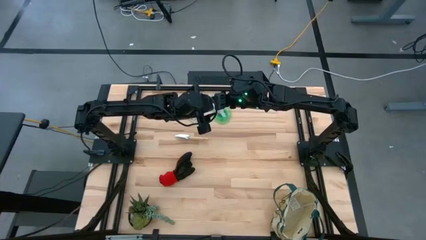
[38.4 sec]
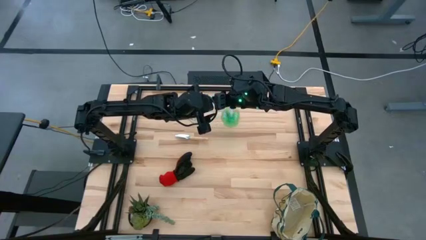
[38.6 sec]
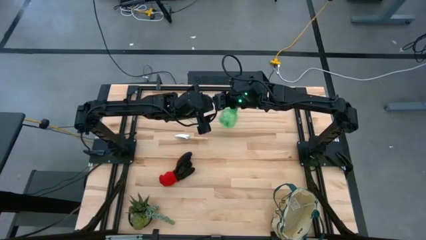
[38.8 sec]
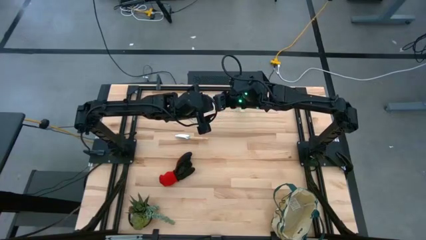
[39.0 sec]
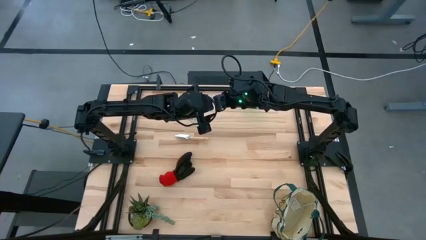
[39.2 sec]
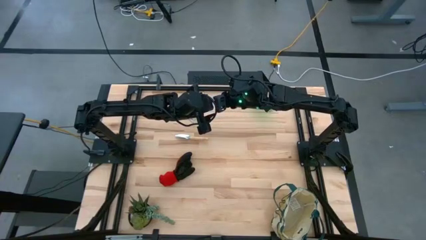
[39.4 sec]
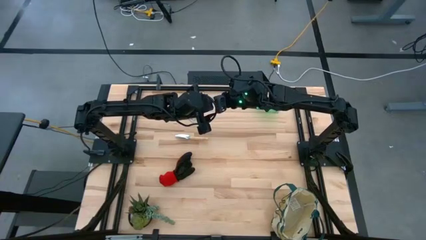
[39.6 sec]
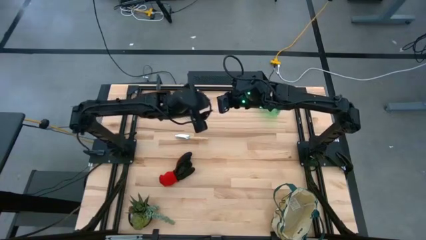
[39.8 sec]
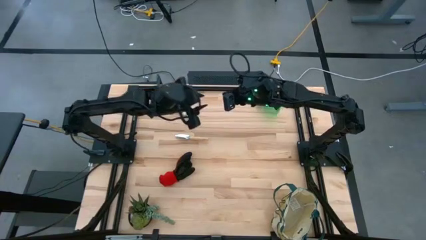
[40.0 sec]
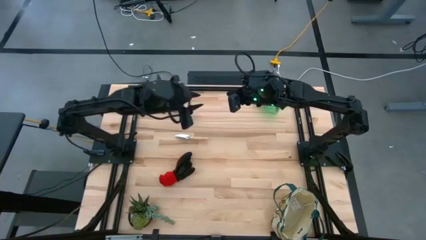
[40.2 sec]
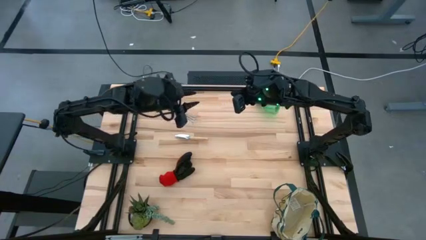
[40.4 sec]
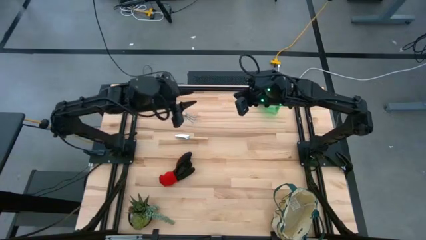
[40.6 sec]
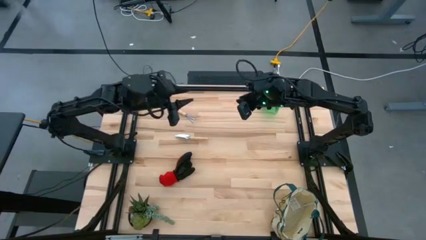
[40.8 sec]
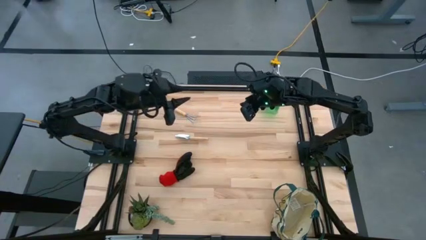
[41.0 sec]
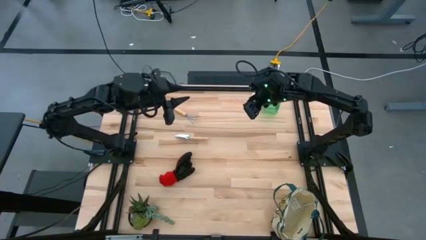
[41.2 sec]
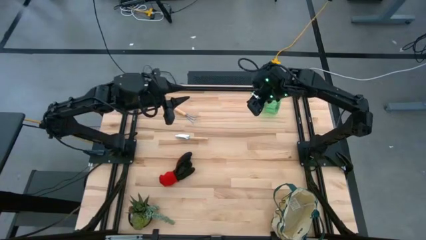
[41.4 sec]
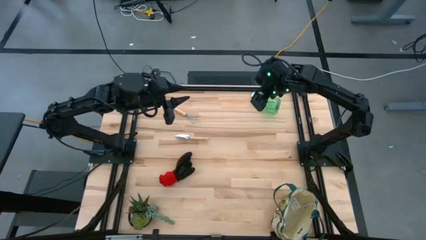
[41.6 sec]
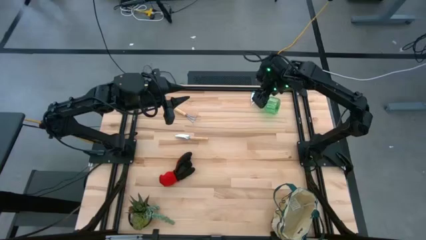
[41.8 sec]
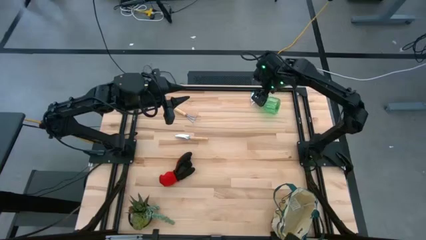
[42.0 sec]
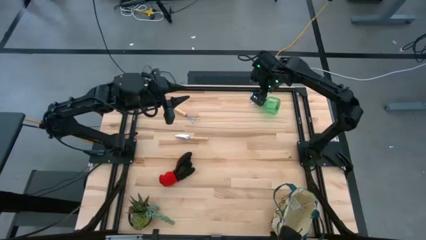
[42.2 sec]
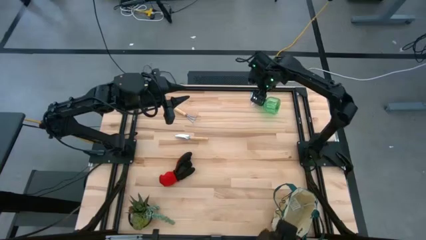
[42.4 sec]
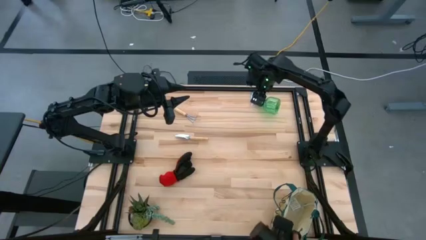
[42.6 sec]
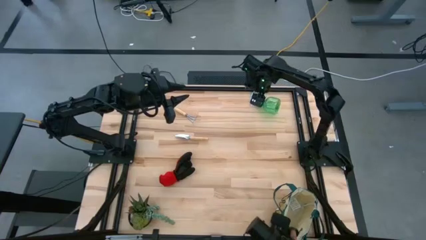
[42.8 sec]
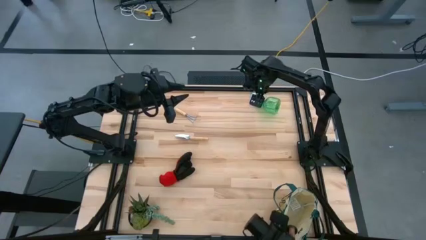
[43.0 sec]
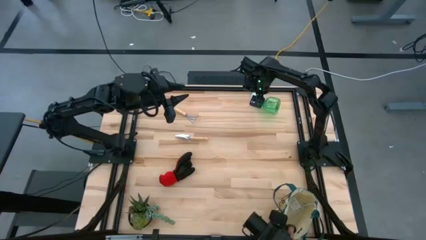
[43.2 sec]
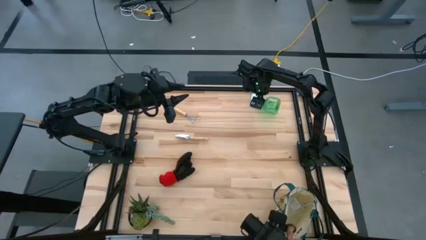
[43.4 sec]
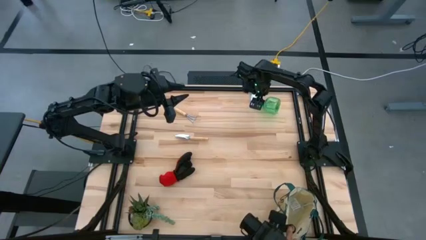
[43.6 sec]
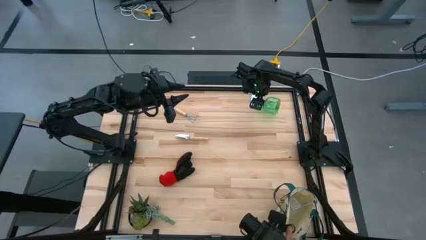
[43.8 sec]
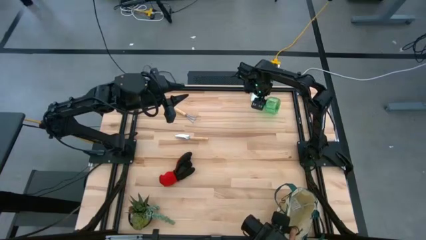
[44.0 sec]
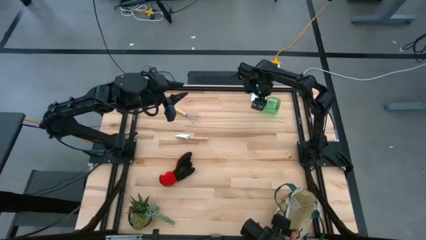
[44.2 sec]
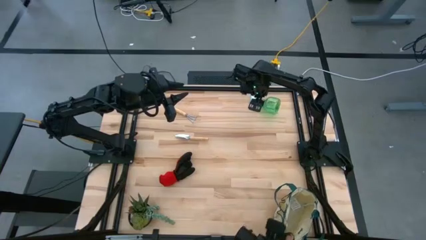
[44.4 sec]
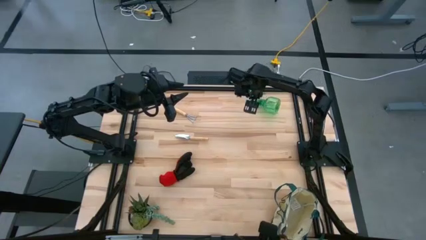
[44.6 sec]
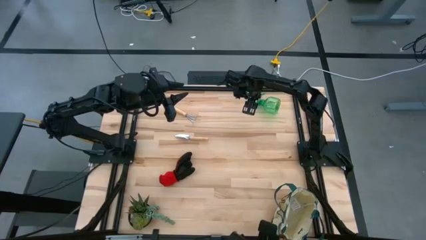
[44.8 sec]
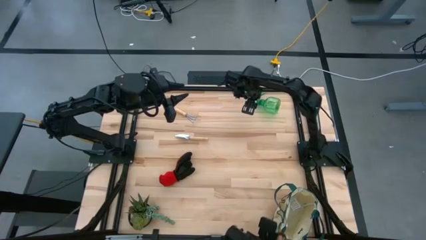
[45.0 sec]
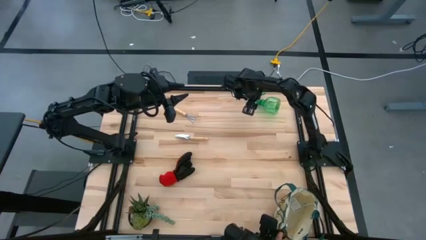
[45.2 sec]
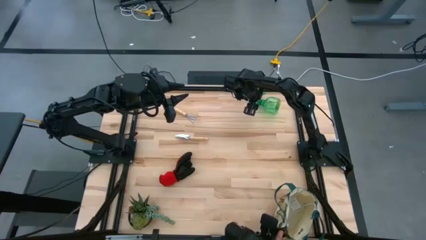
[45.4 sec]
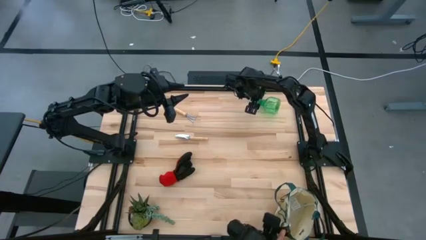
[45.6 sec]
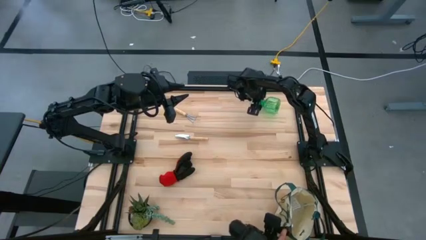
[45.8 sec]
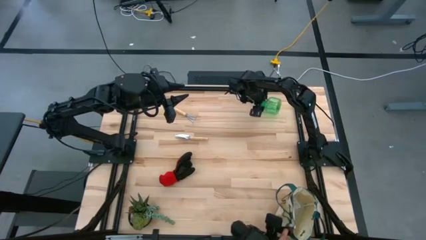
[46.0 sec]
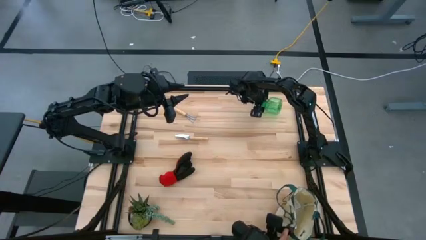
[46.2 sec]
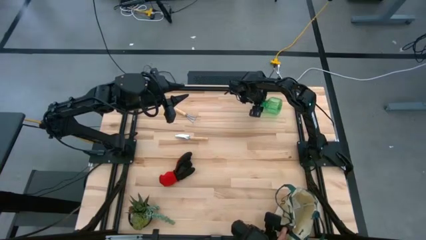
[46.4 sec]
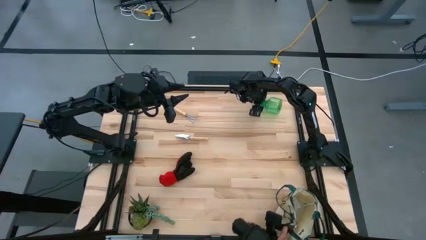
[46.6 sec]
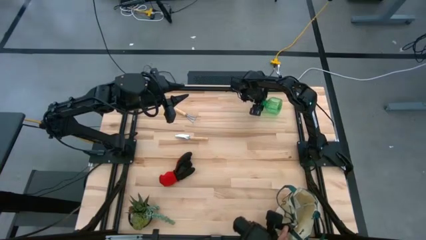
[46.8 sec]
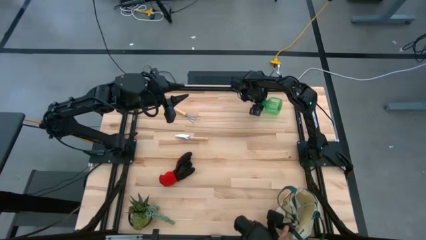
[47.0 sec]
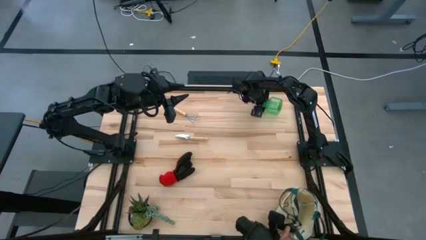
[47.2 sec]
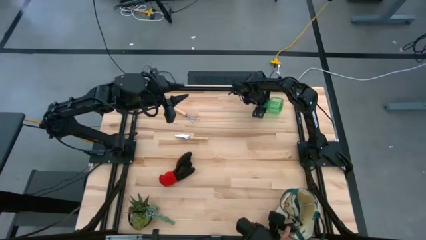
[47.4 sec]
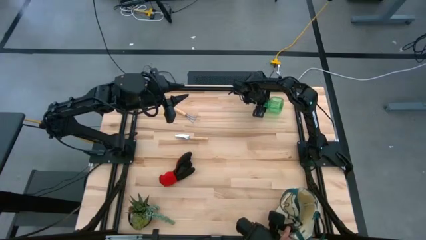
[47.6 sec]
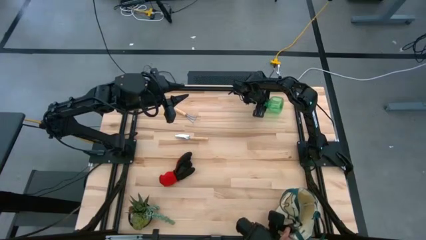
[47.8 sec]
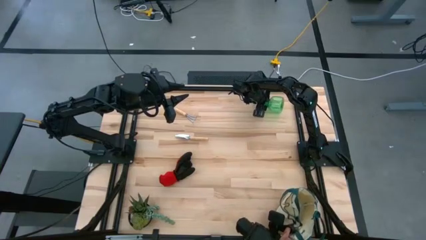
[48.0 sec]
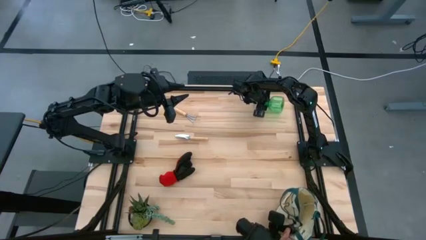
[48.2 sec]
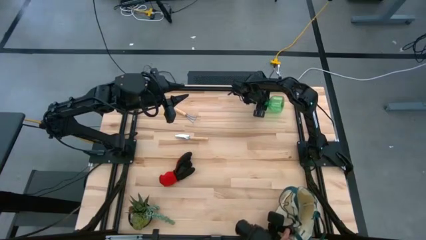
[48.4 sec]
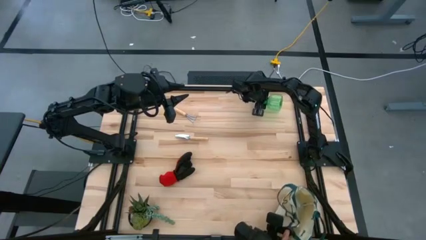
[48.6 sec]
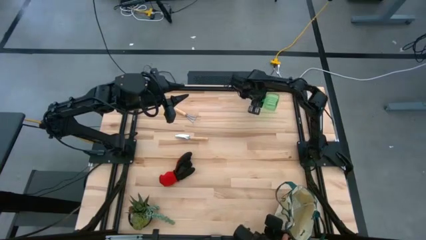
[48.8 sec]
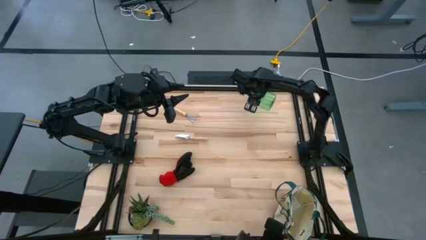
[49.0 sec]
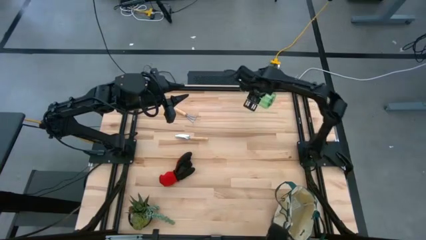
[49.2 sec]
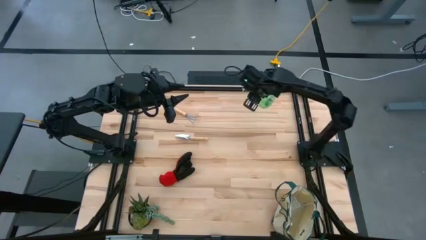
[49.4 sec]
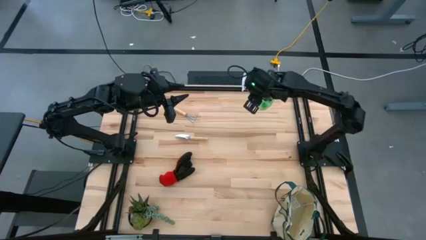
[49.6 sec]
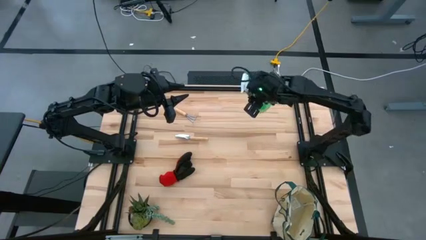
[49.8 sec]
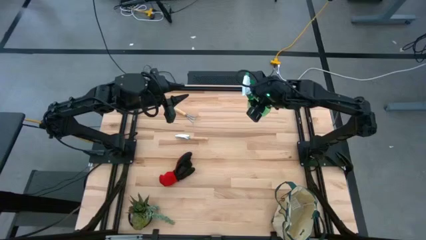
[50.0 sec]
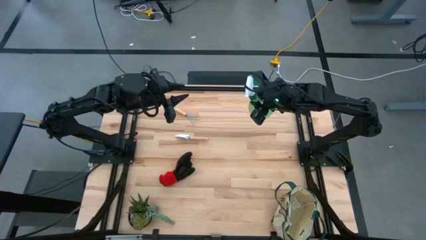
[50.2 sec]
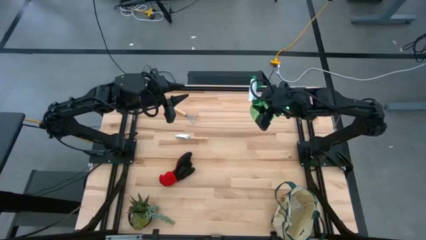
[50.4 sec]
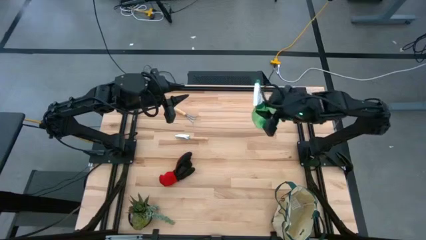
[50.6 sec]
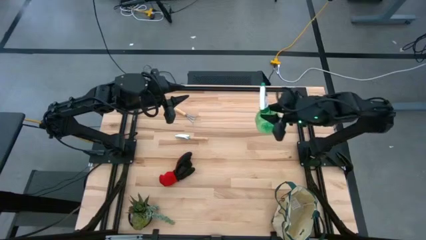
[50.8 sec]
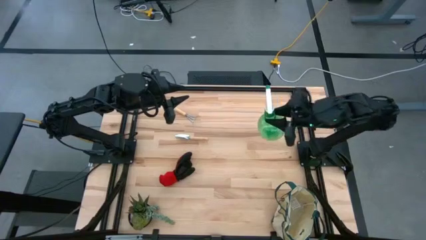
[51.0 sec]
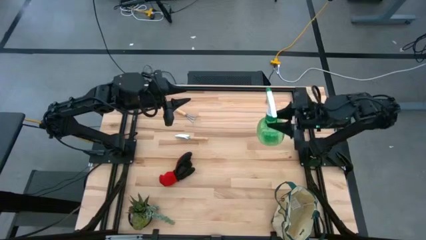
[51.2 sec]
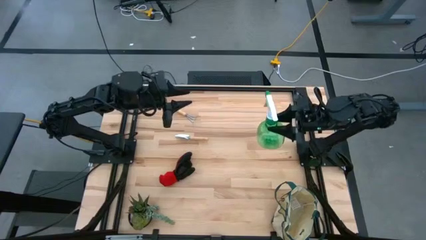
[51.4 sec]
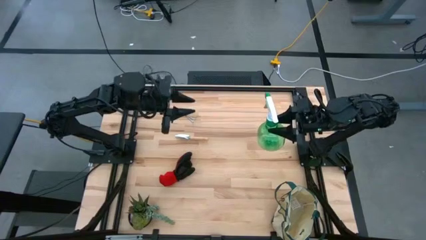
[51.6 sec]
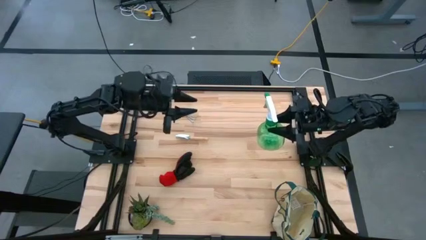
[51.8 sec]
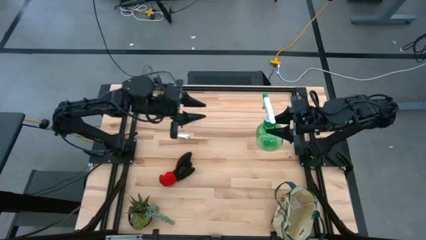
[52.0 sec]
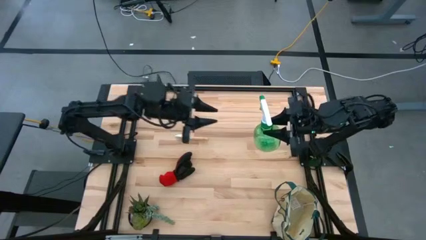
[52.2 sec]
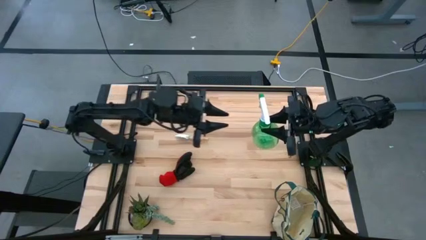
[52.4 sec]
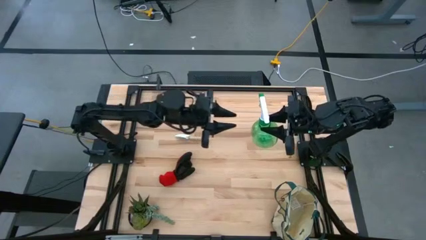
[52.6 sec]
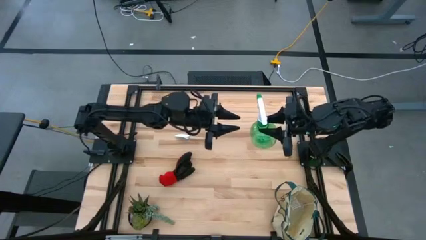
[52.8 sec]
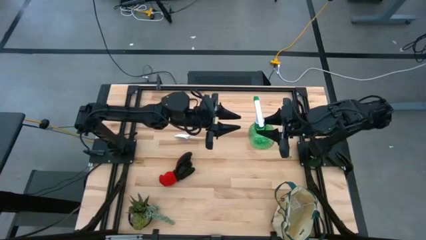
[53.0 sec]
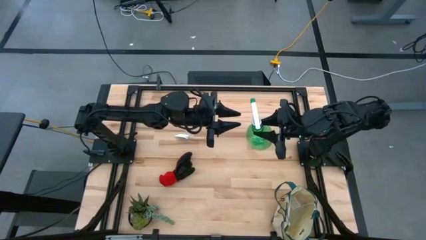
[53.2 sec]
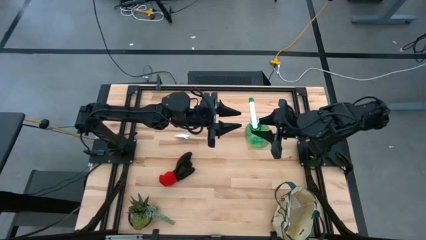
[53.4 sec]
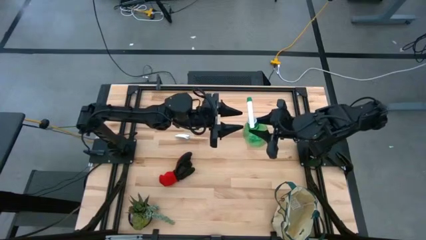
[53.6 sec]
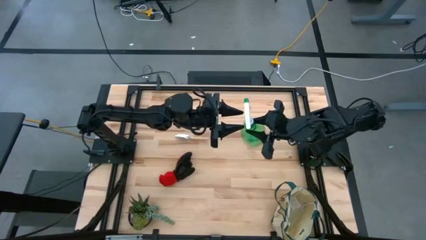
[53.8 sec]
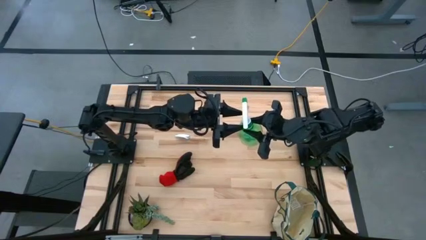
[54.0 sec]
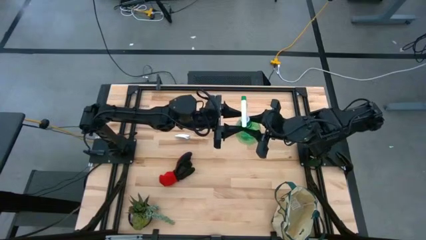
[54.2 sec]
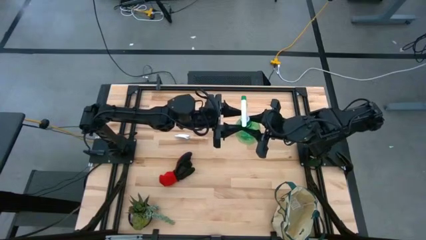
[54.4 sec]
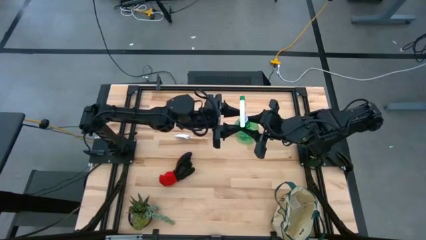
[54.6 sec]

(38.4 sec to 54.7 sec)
Task: Pick & Place Garden tools in Gardening bag
Put the green spray bottle into the gardening bag
